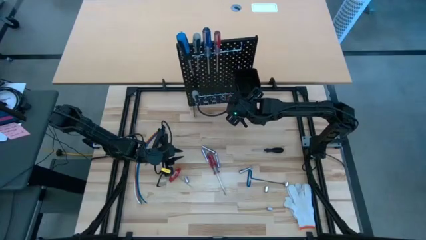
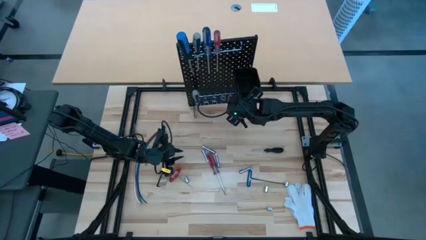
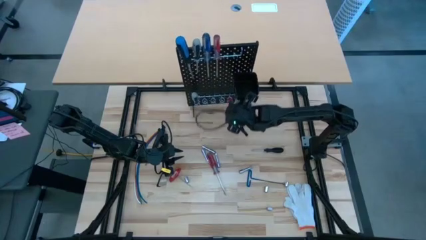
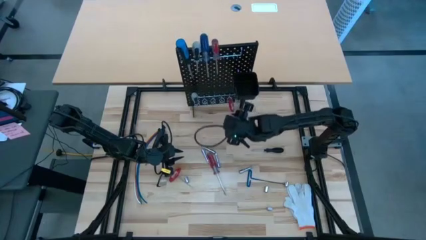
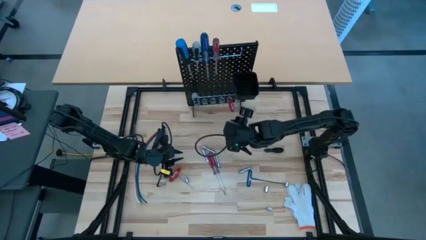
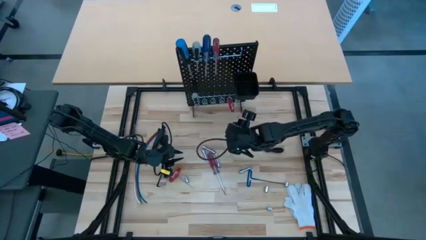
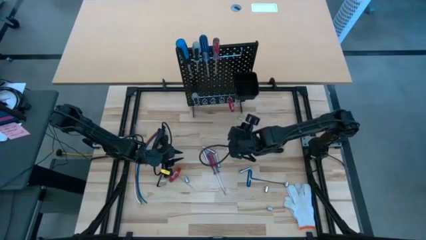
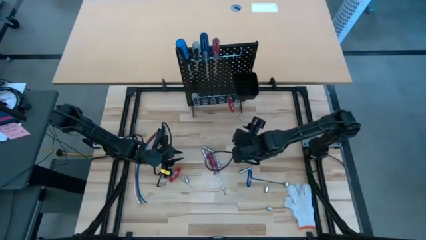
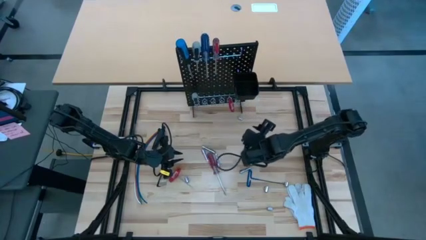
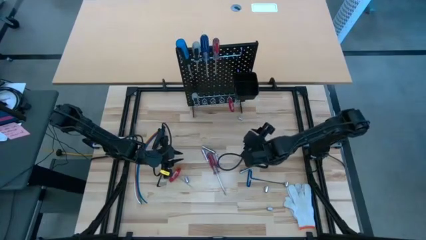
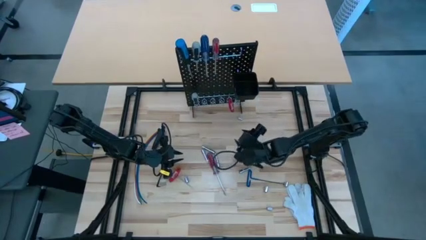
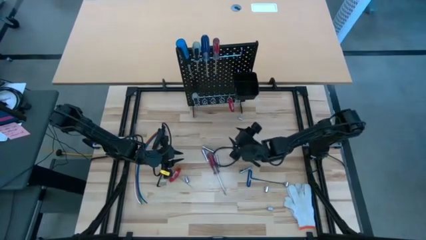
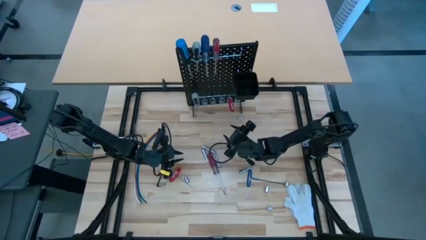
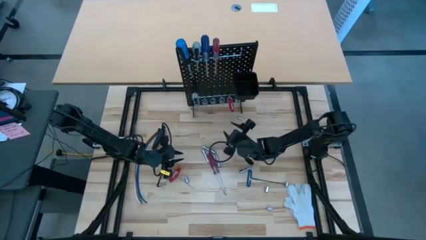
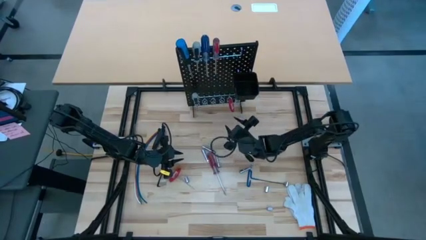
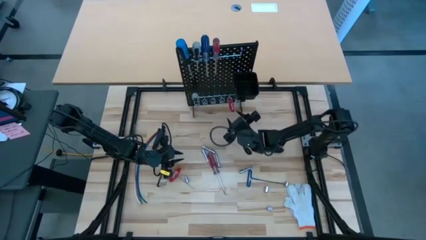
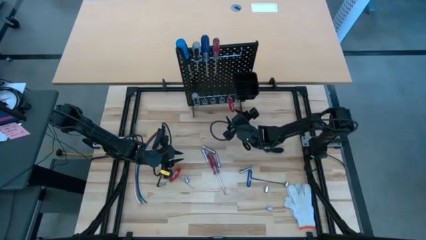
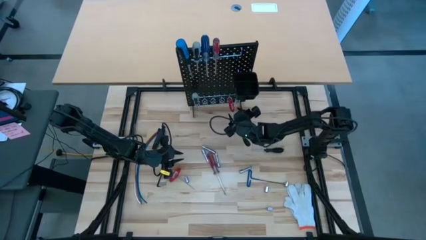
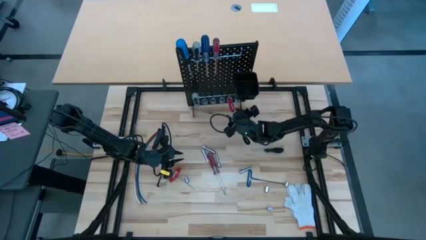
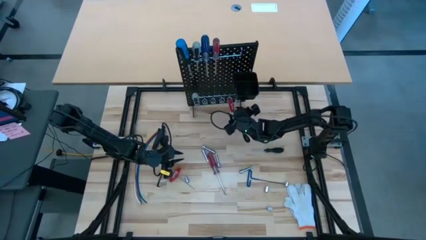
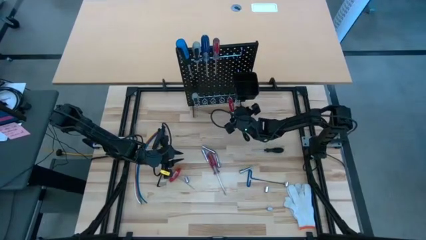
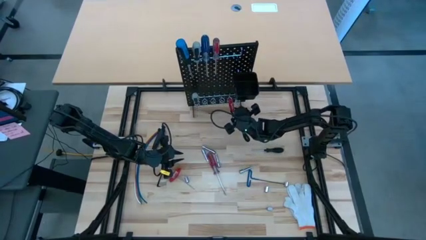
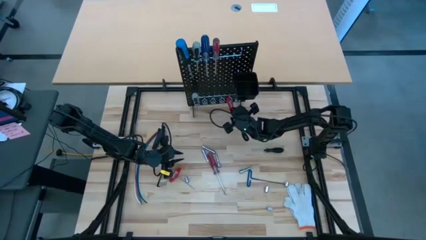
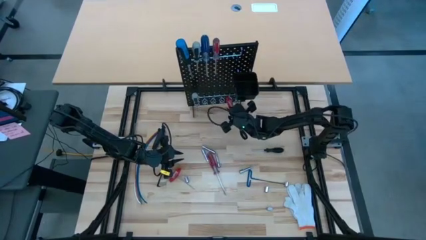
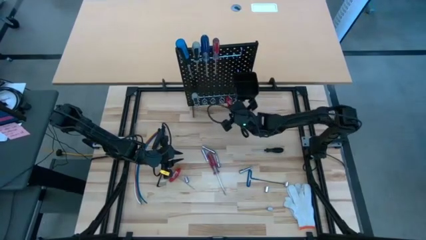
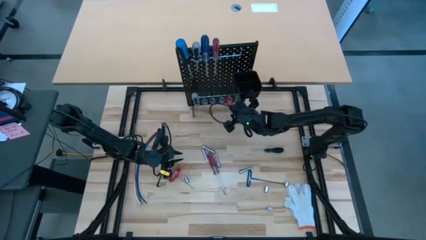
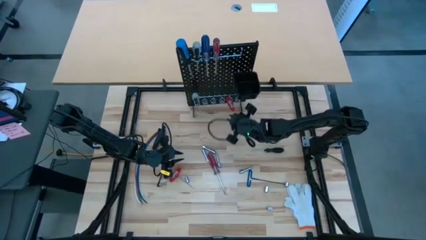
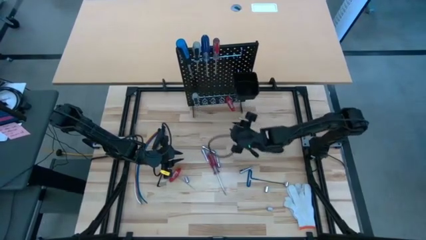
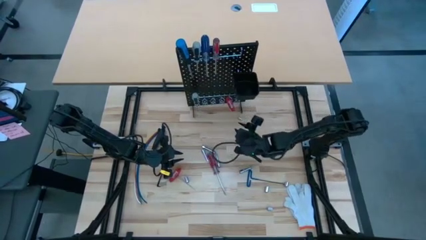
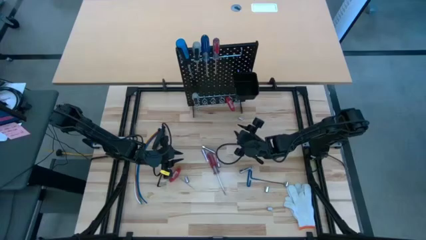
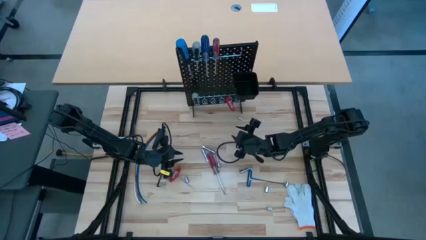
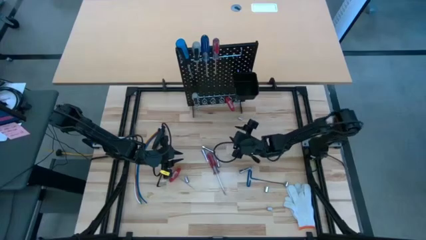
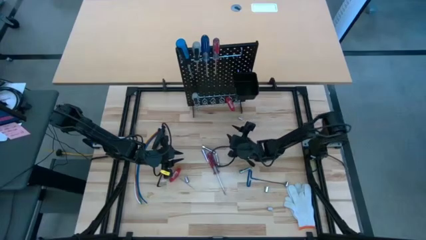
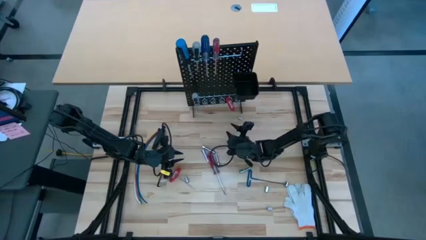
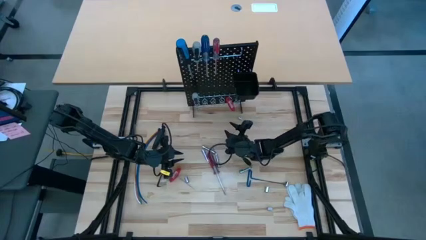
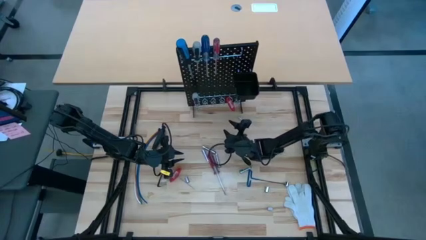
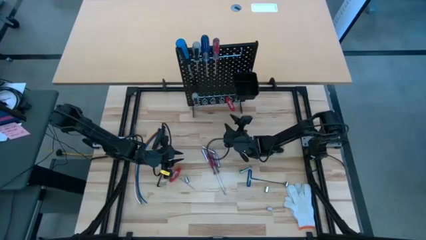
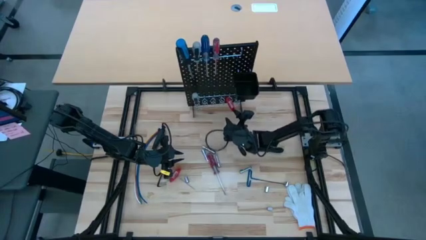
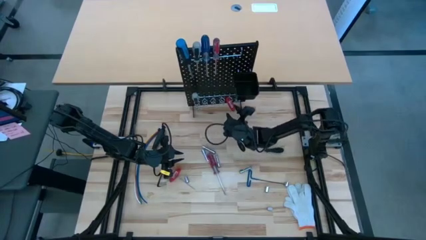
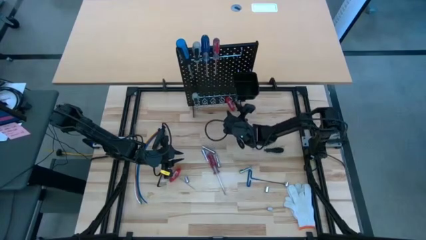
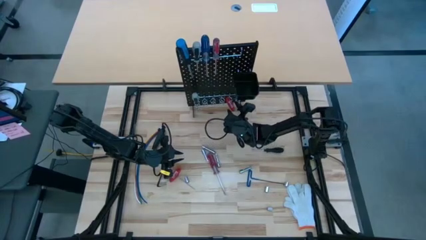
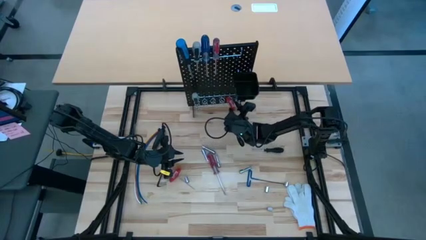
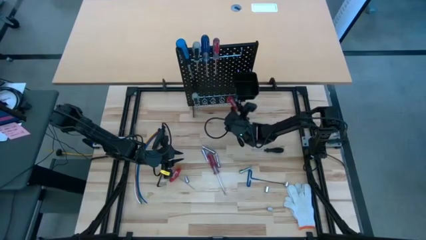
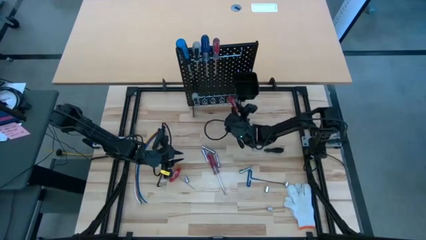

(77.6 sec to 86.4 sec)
Task: Hang tools onto peg board
Hang the allen wrench on the pegboard

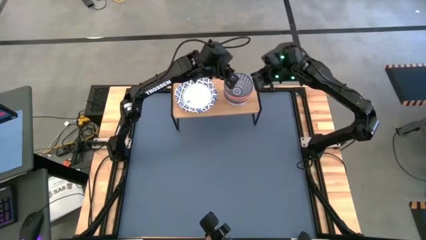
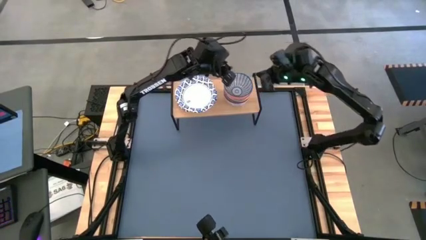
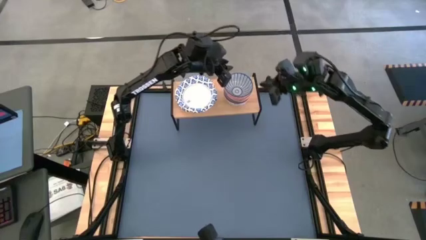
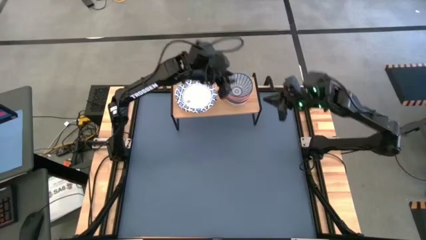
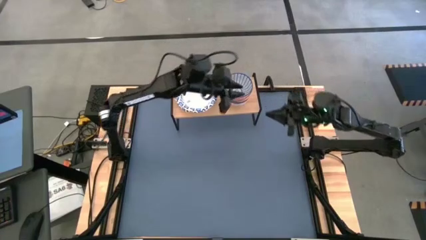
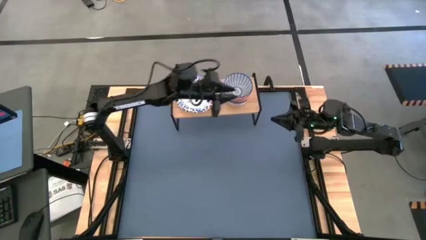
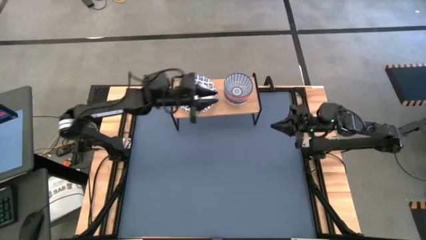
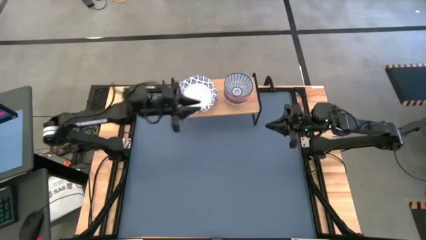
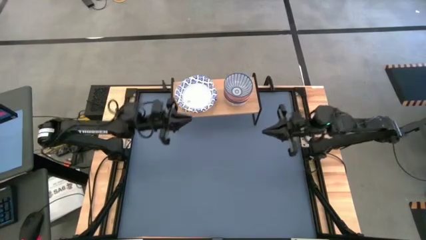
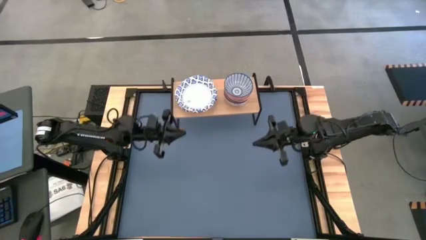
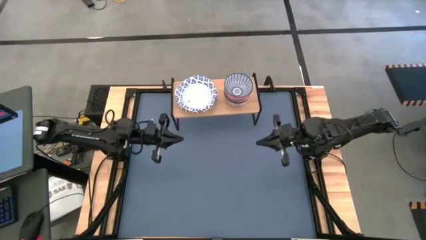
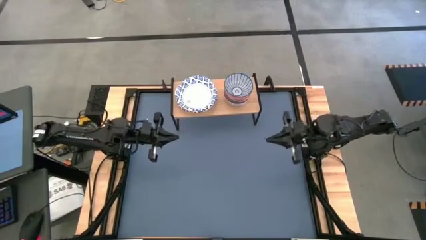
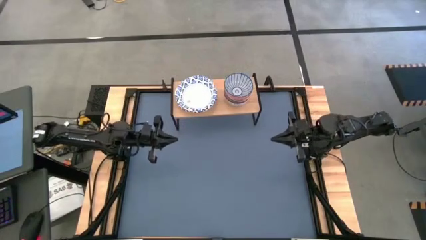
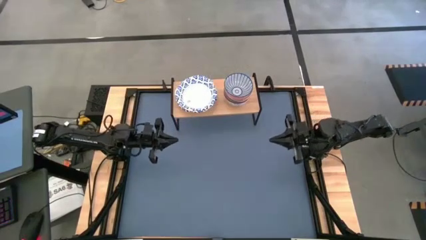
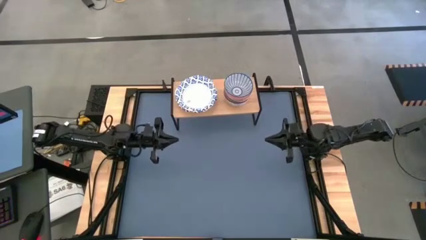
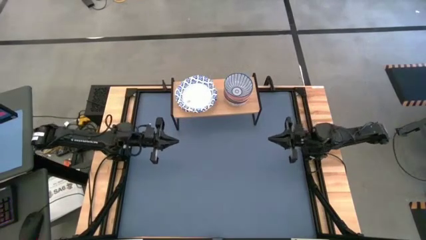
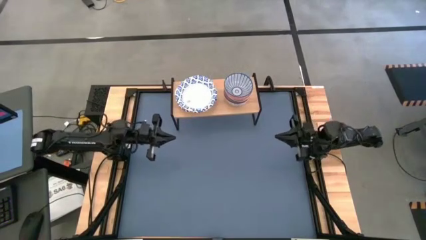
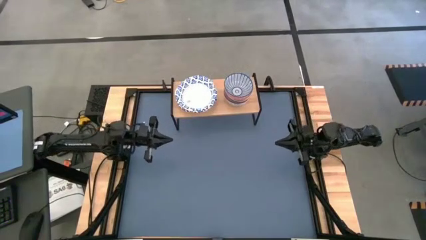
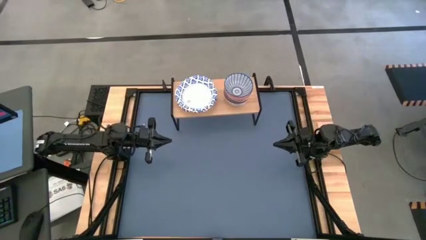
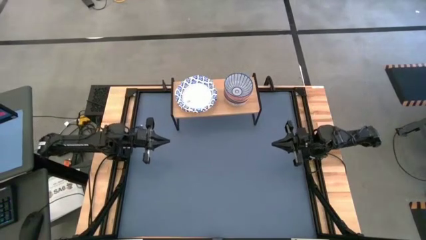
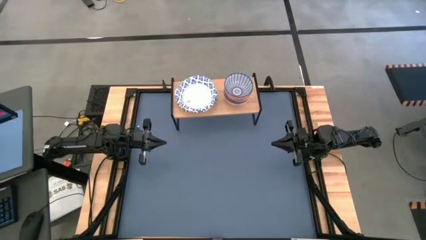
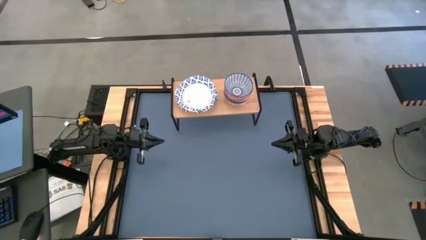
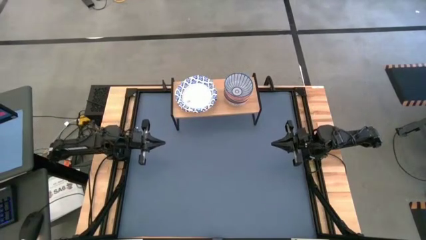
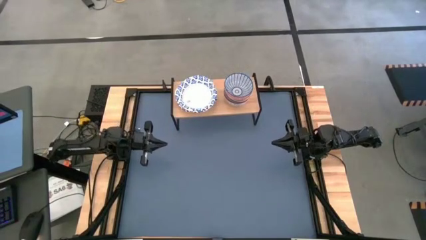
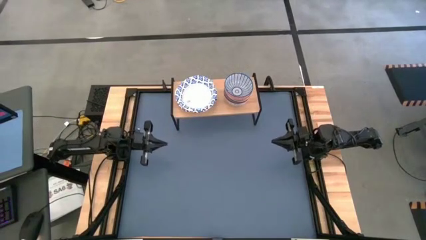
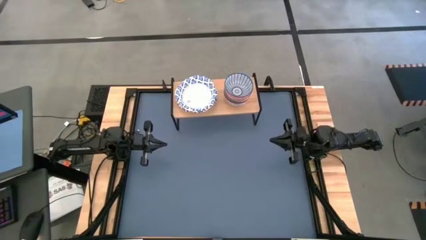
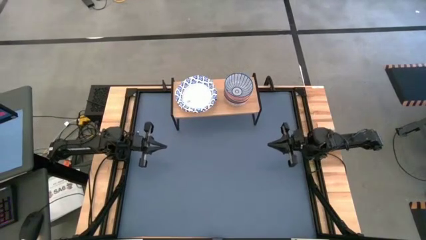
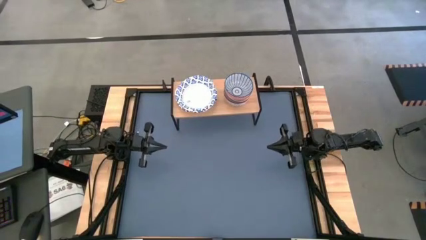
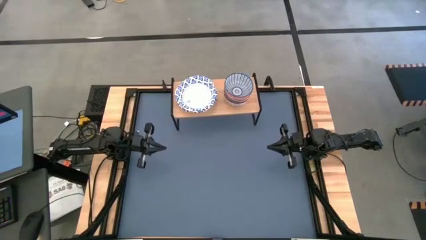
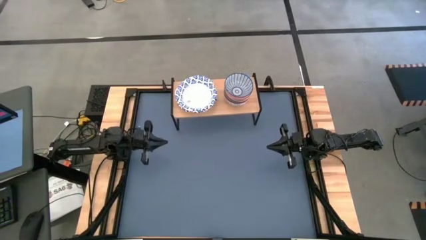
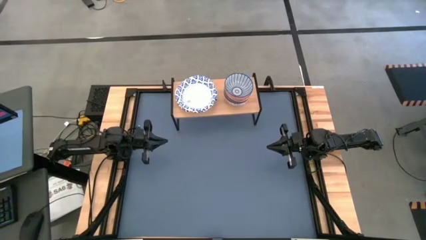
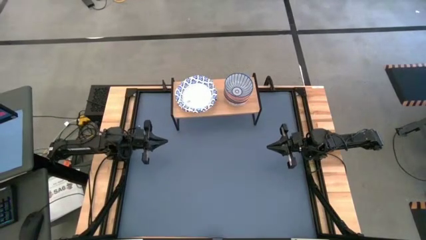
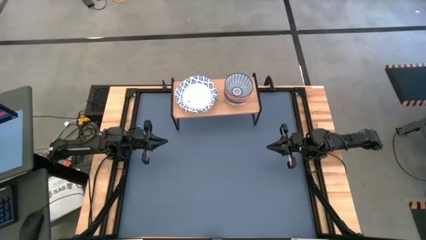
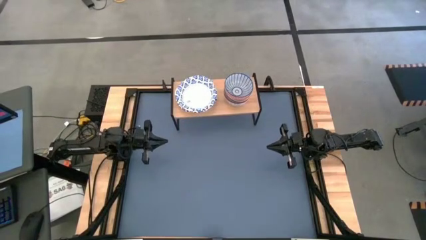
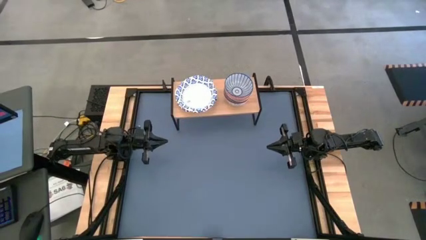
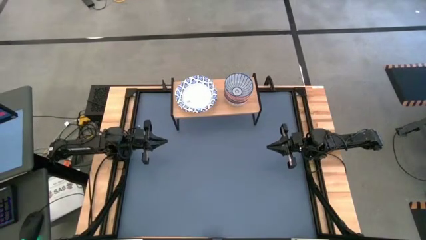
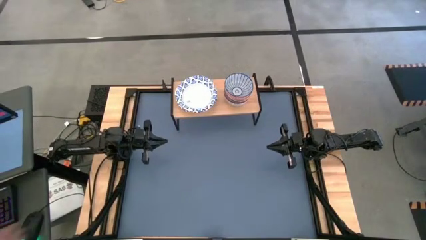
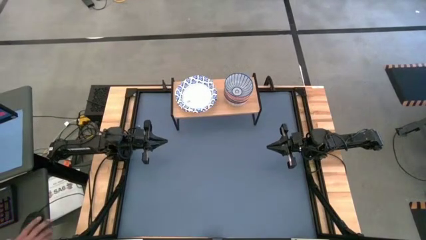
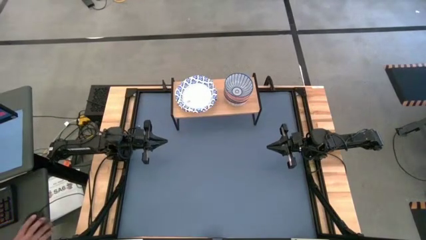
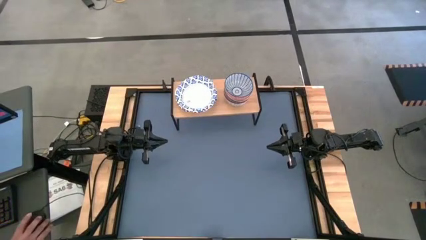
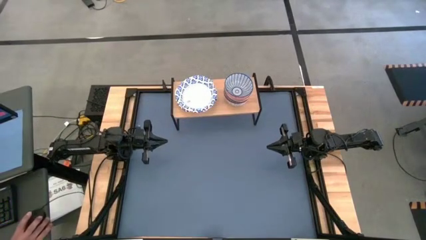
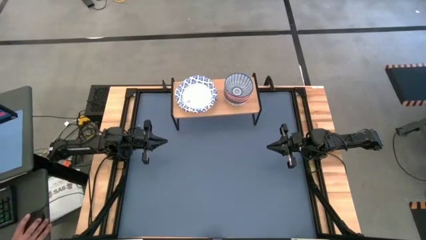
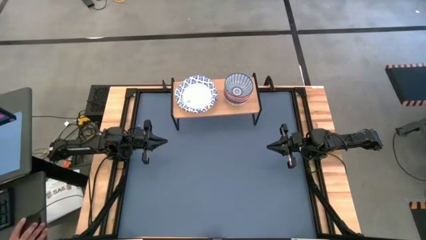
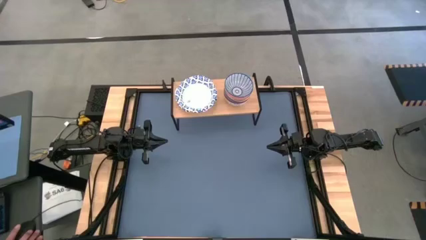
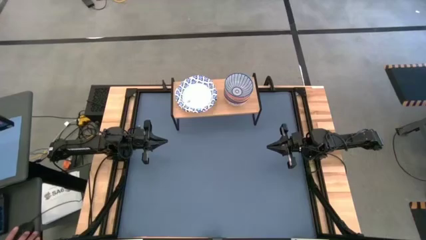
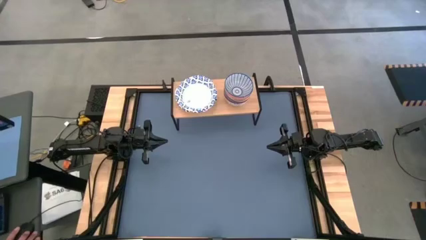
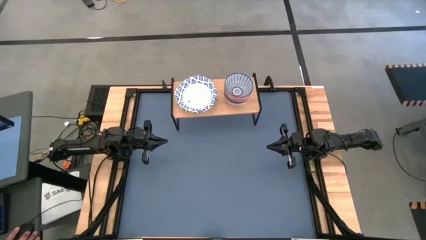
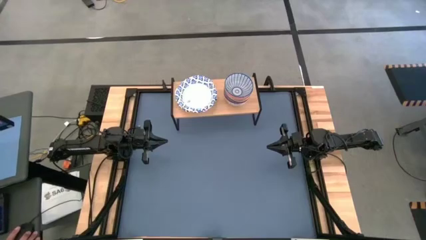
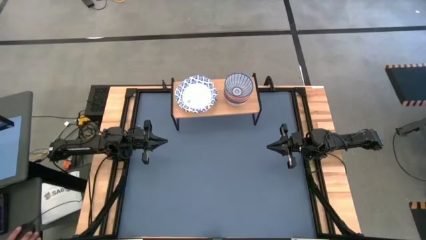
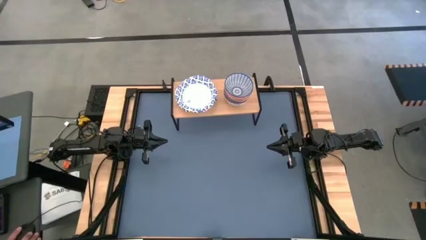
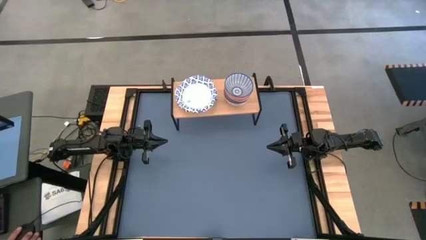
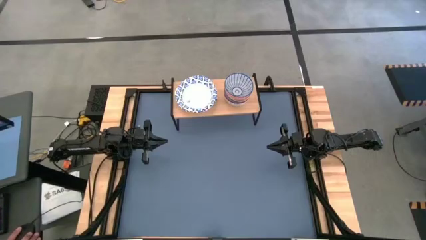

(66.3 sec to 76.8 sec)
Task: Place and stack bowls onto a shelf
Return to Home Position
